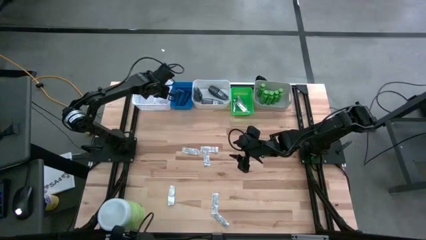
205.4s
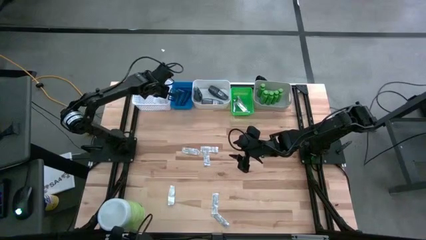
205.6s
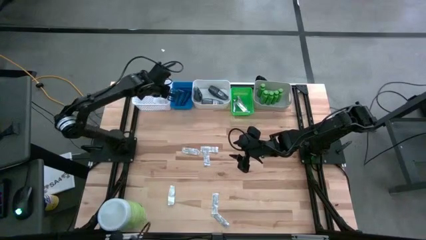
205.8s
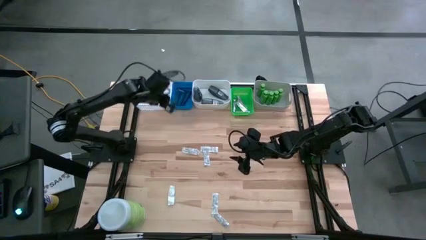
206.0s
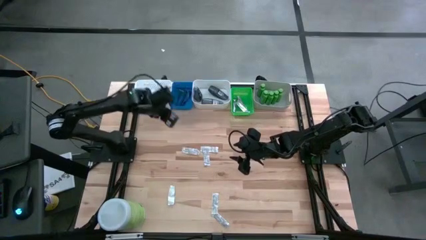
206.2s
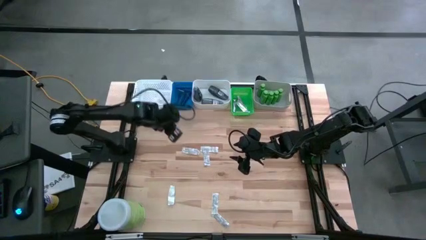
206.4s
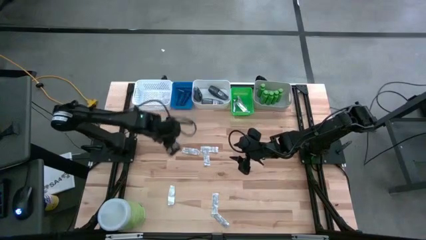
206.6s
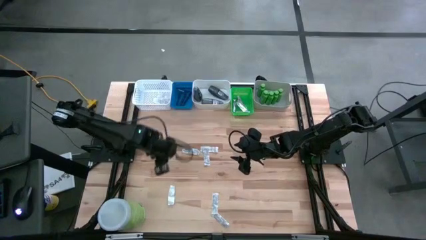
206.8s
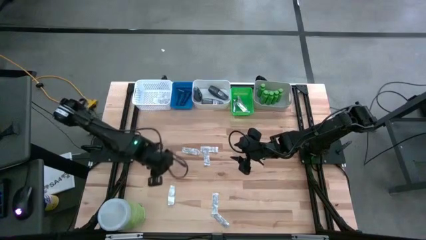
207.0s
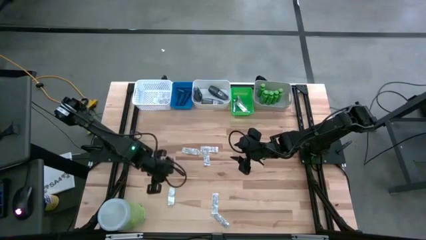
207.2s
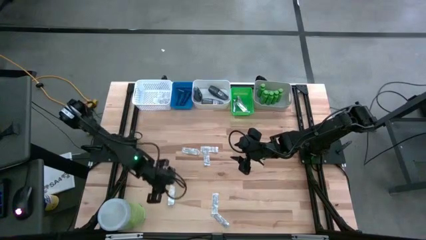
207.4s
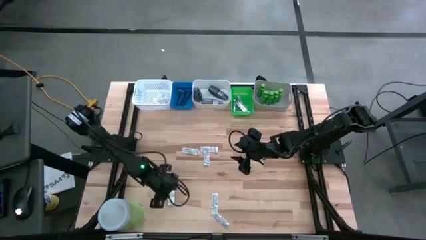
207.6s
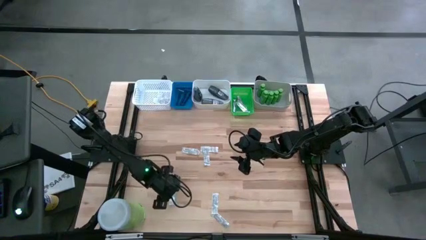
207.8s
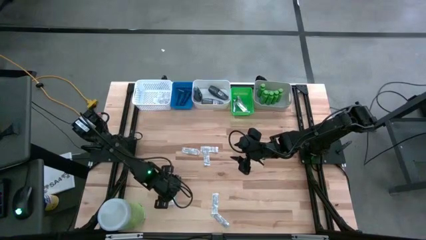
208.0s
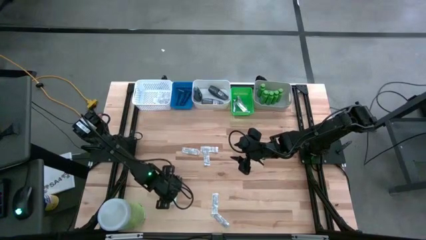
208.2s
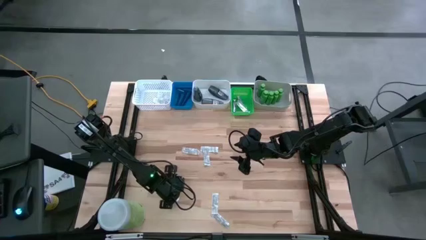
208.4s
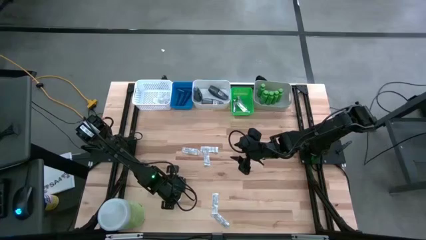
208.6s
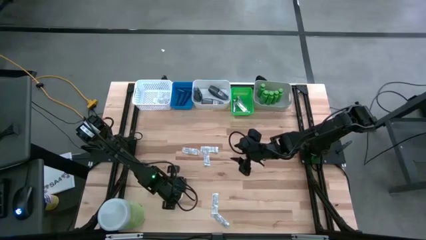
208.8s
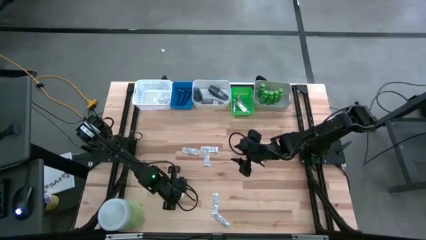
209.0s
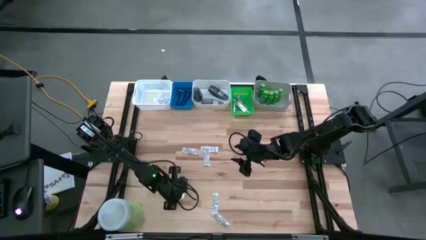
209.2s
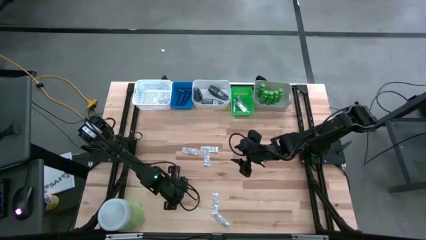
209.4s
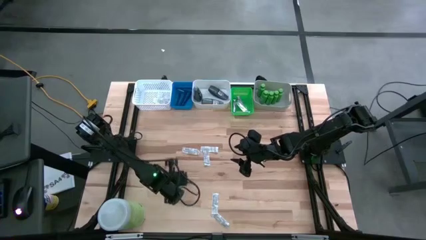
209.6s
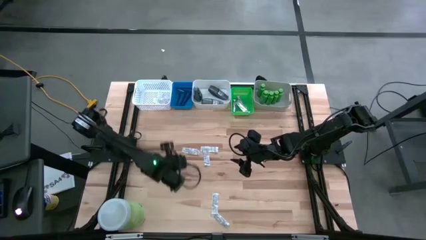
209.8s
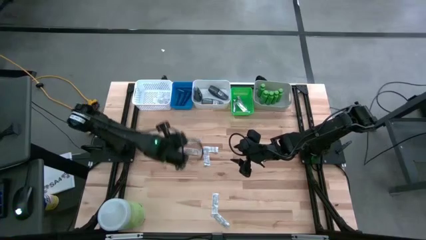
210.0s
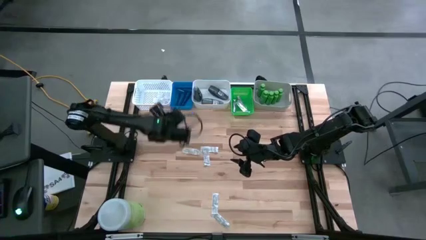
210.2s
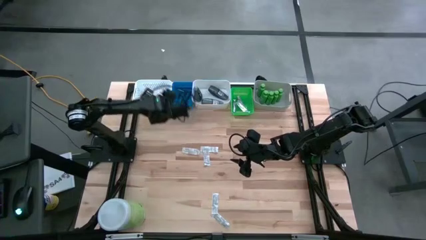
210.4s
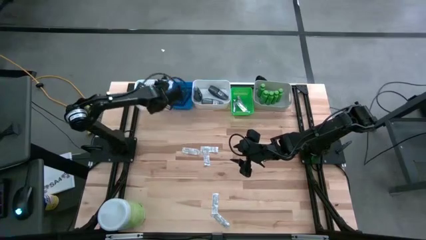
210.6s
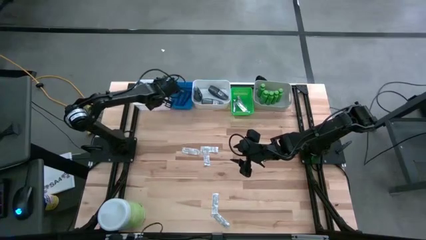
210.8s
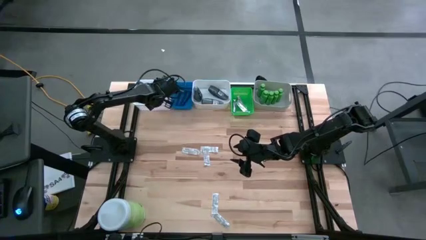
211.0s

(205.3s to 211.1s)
Task: Pick & Place Travel size toiletries
Put the bandage pack into the left white bin

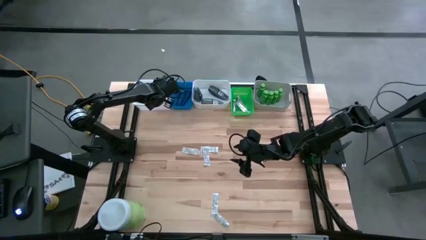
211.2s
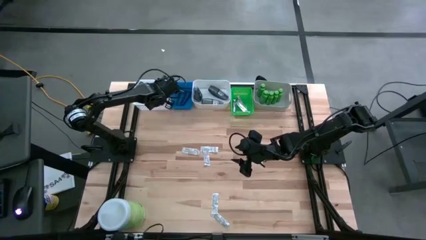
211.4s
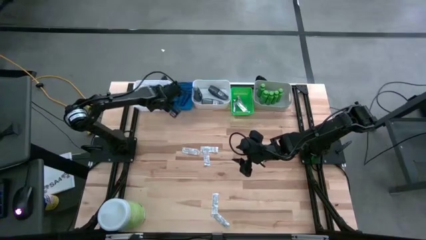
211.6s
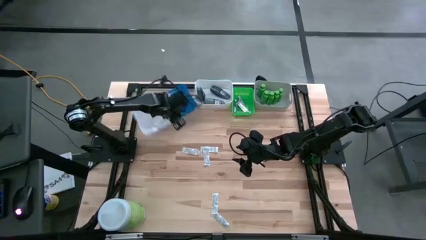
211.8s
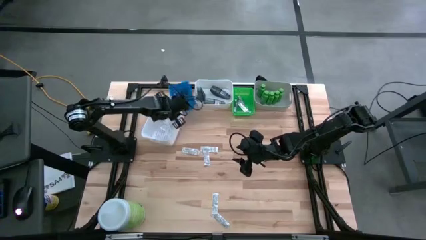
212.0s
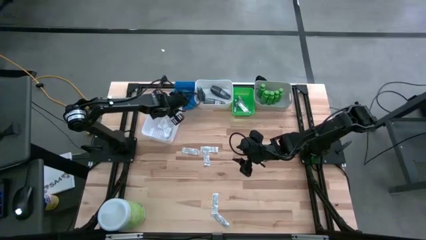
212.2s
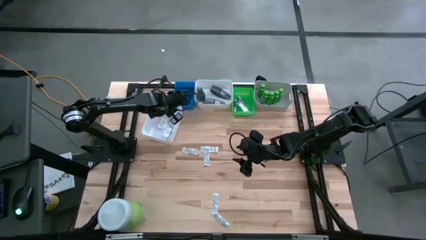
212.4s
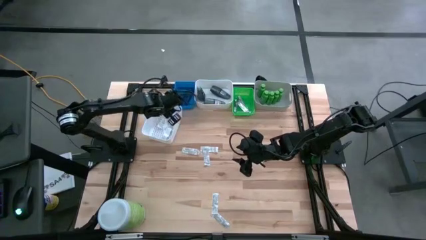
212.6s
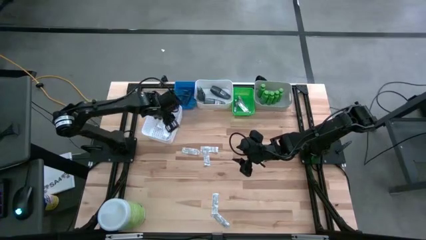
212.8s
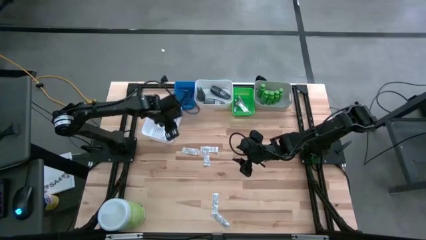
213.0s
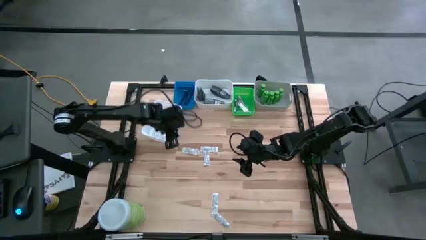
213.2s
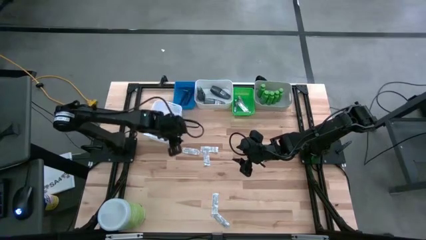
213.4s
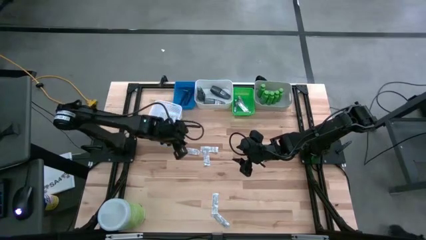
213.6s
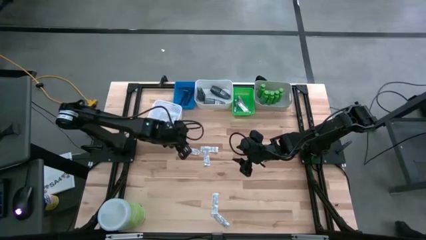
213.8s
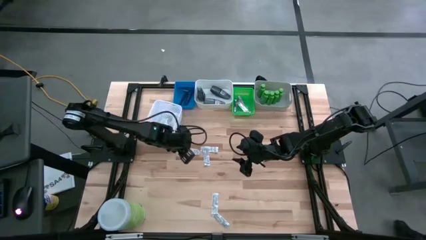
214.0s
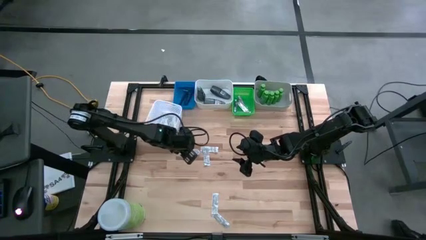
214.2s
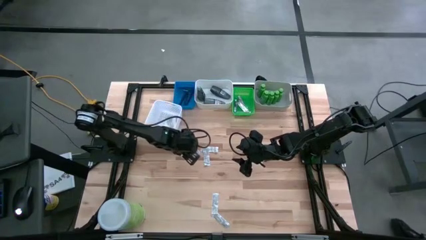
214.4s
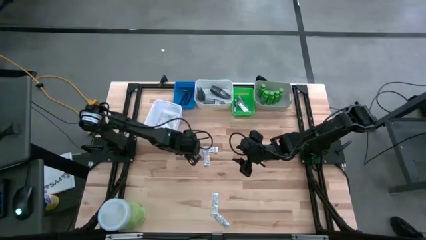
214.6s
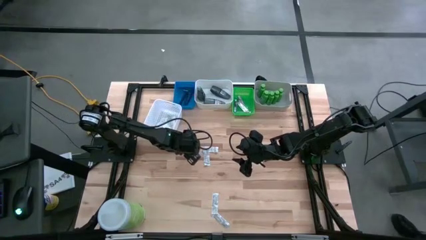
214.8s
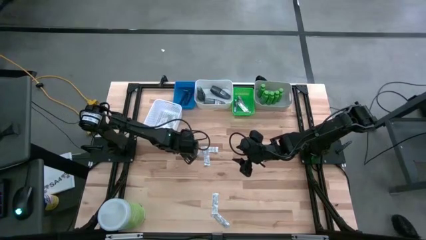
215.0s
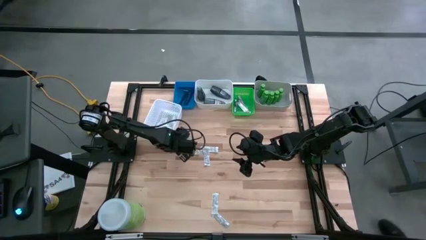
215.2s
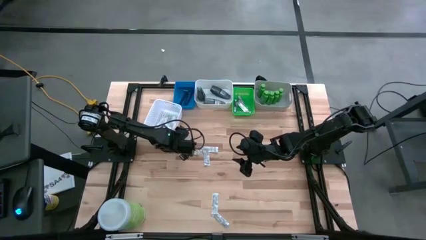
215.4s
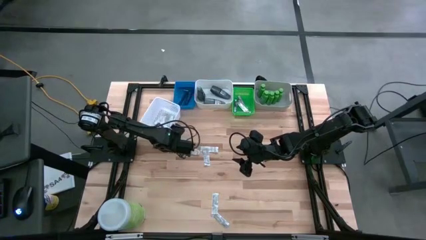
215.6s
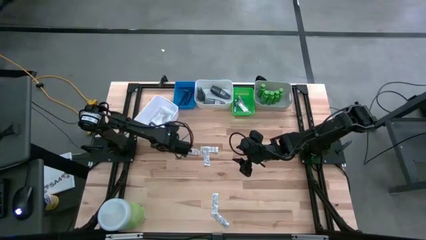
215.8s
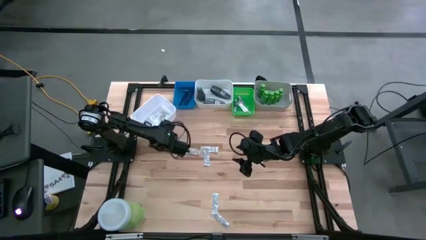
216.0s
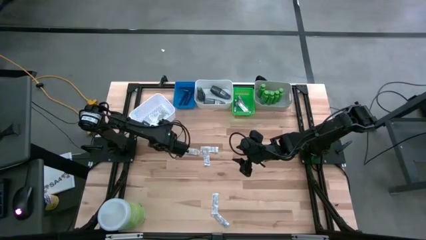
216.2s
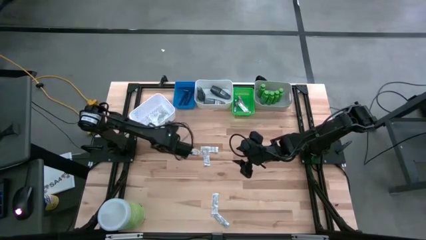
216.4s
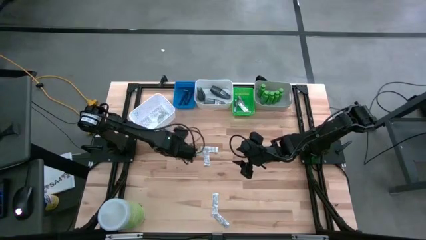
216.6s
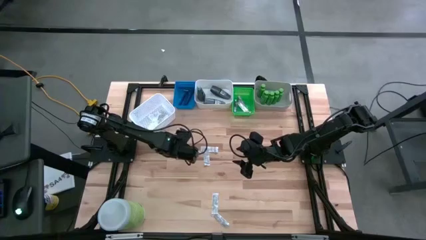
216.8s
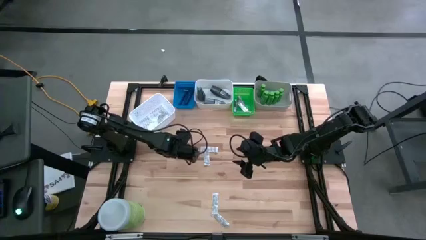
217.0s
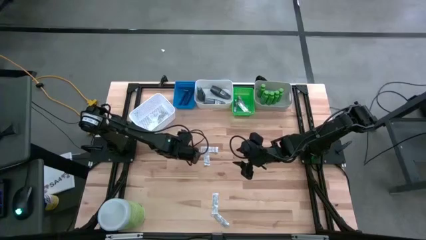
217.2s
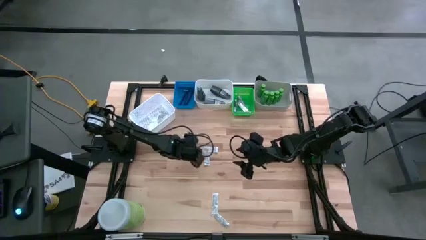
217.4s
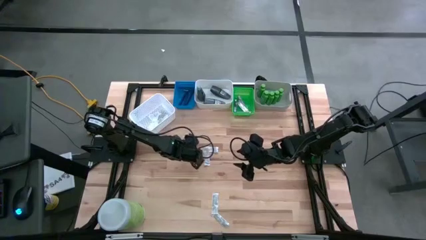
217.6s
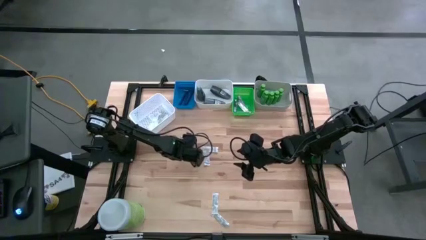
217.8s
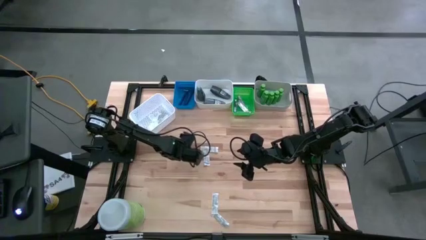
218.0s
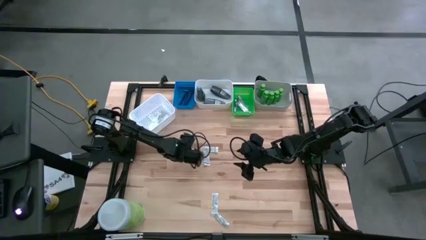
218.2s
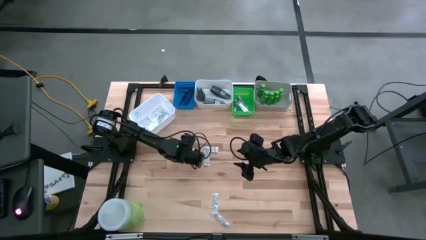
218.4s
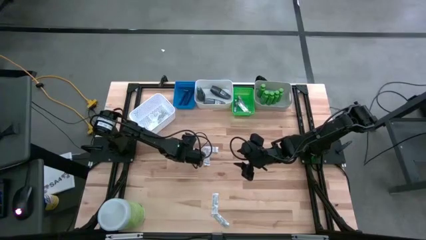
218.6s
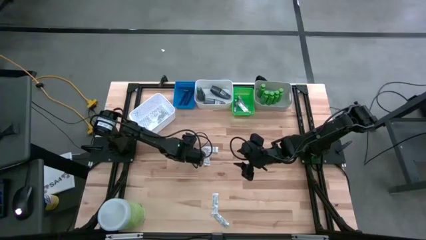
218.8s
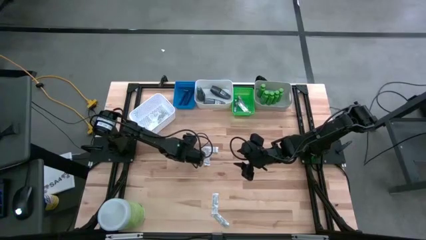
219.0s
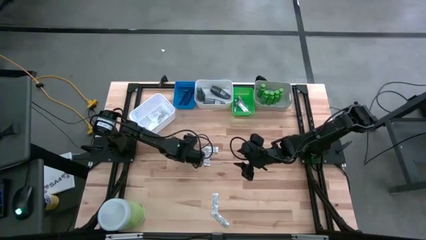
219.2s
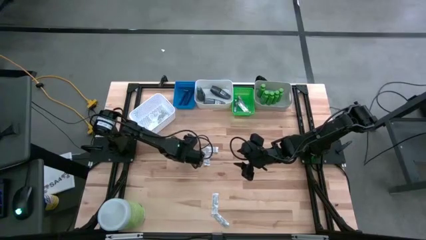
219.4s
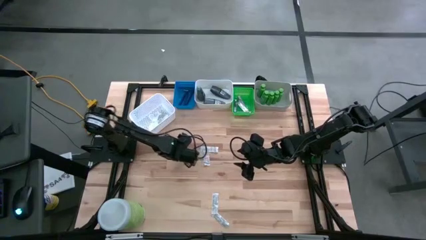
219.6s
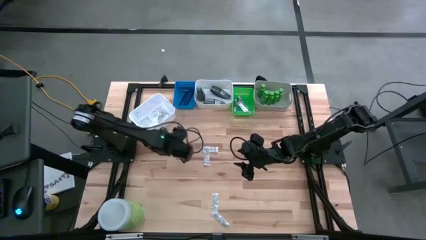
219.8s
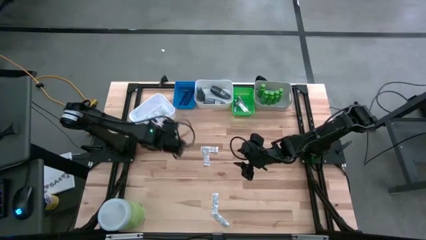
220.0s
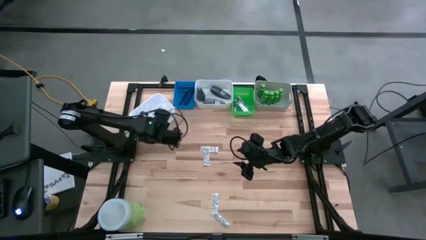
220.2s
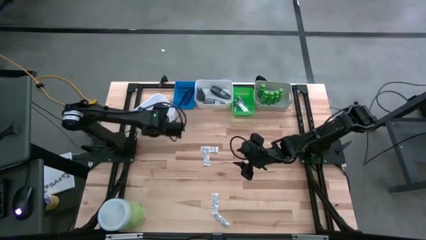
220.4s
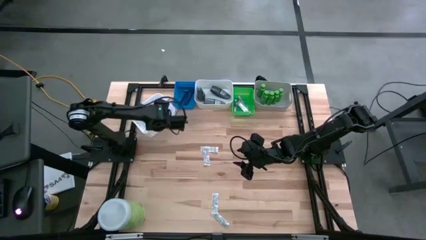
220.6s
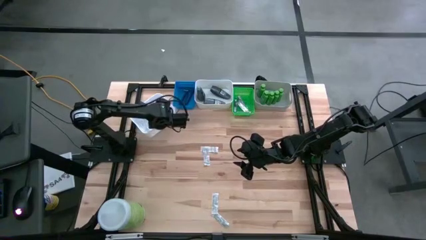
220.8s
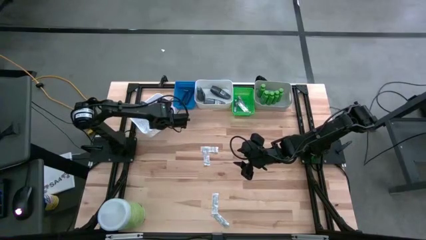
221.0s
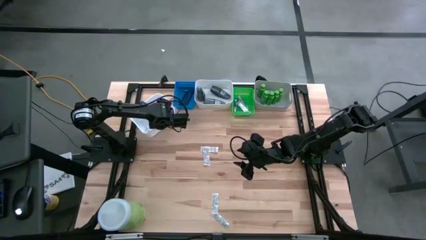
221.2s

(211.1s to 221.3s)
Put the bandage pack into the left white bin
